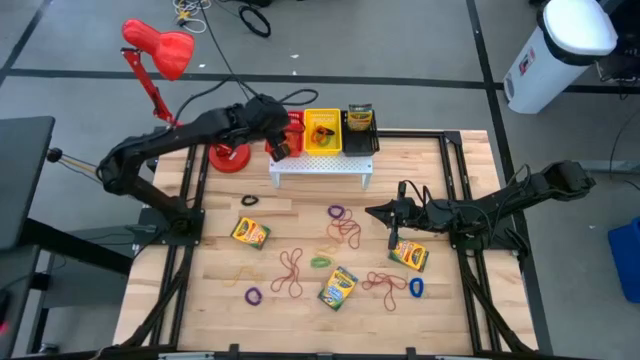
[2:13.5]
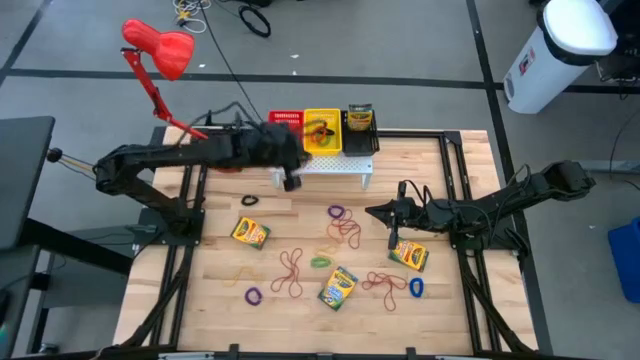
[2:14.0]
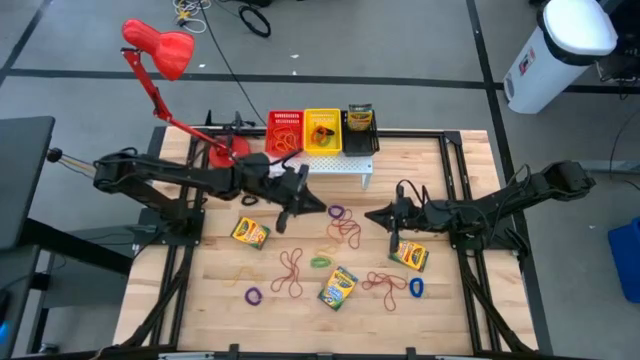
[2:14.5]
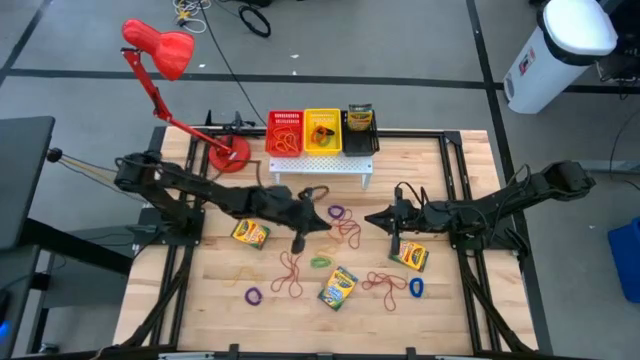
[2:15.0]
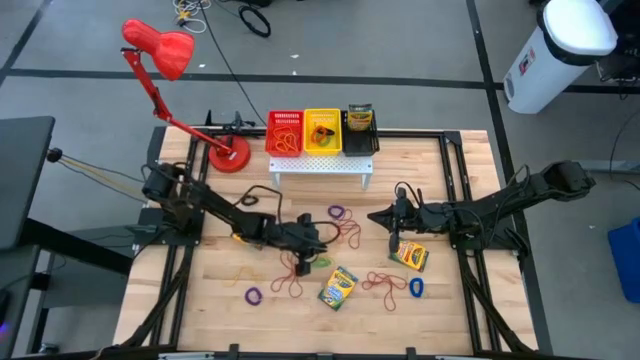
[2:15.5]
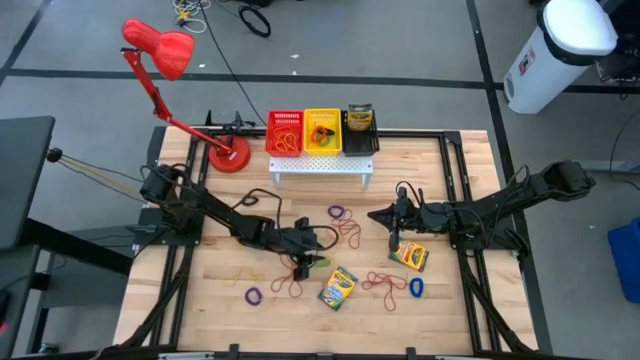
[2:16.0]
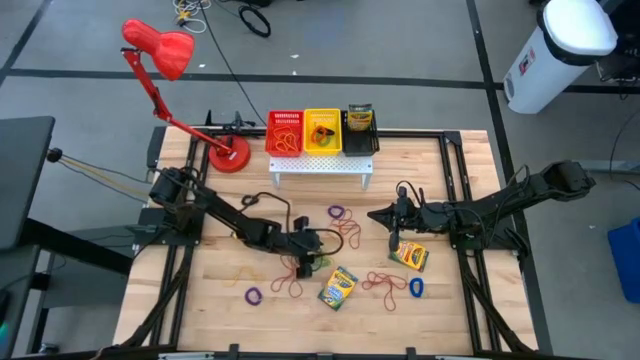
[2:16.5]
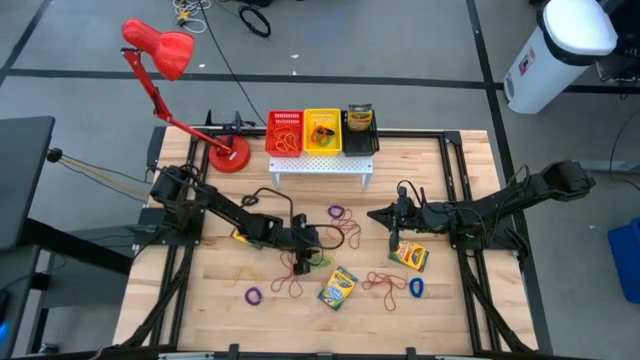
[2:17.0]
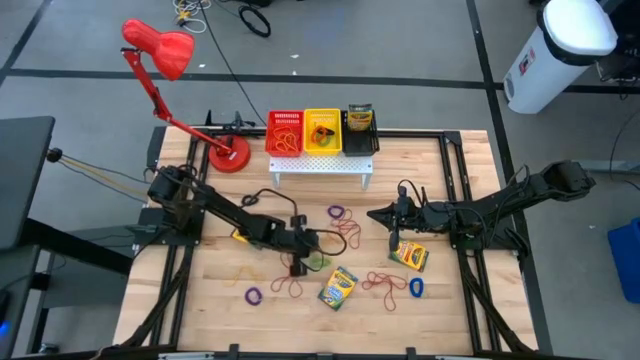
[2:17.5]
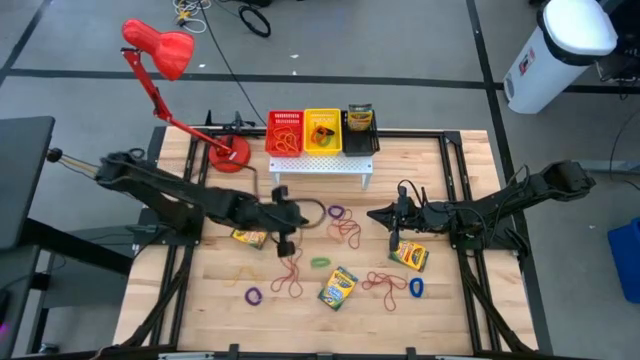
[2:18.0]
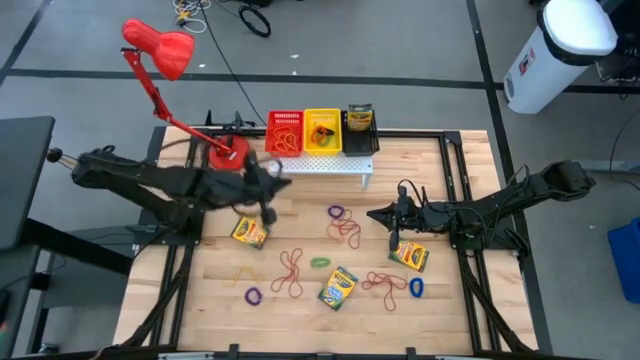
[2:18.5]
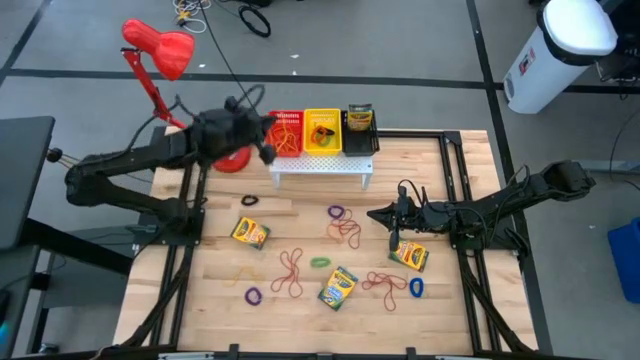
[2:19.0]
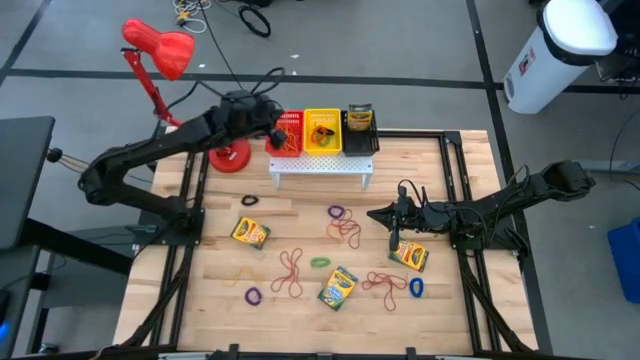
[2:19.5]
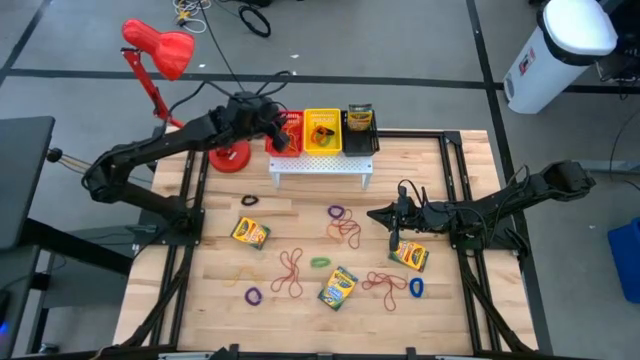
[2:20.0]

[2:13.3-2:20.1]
Task: Pick & Place Office Desk Supplies
Put the yellow rubber band into the red bin on the shelf

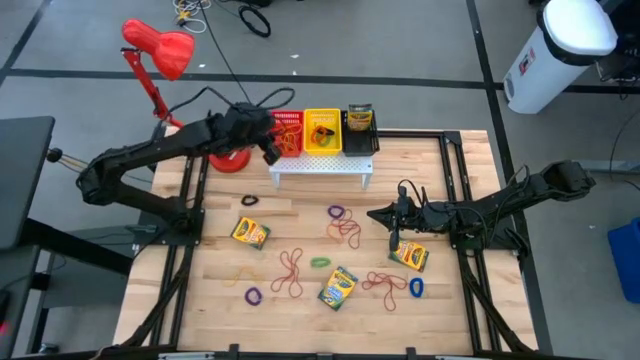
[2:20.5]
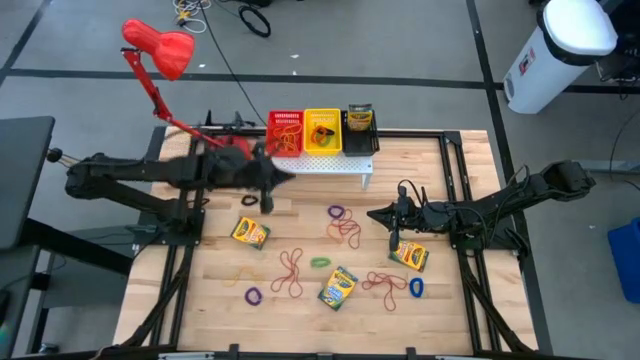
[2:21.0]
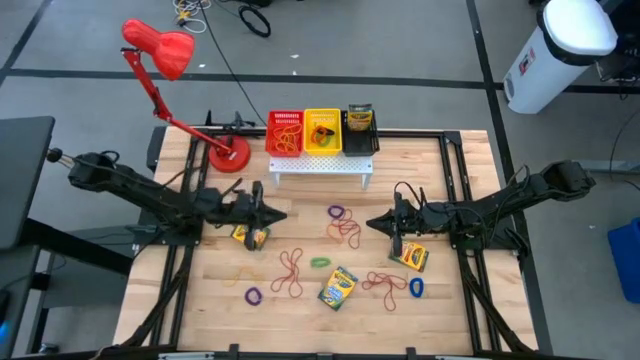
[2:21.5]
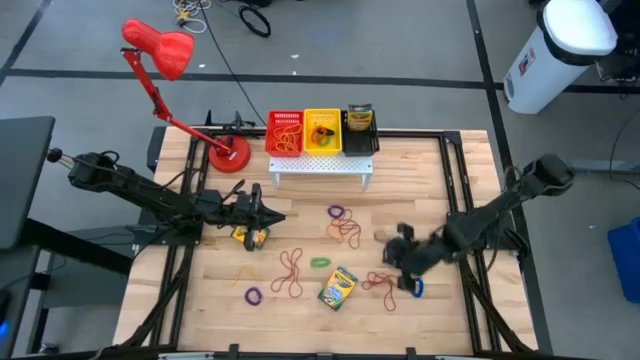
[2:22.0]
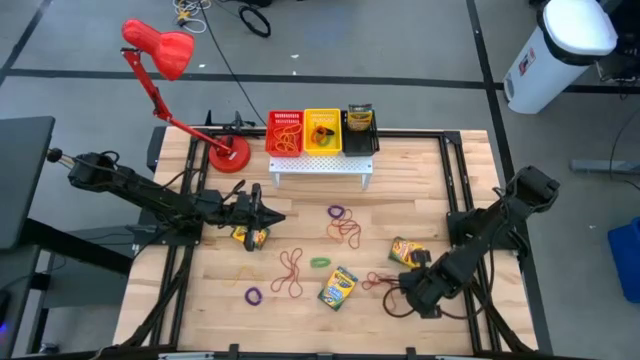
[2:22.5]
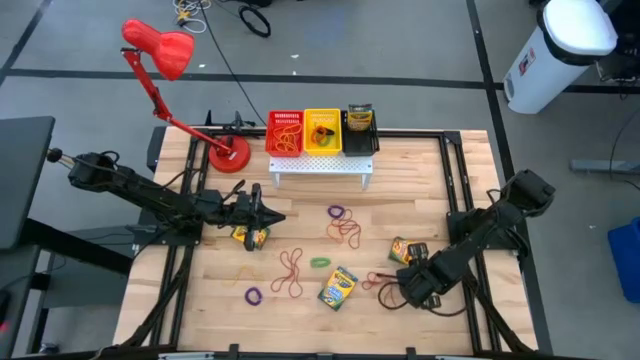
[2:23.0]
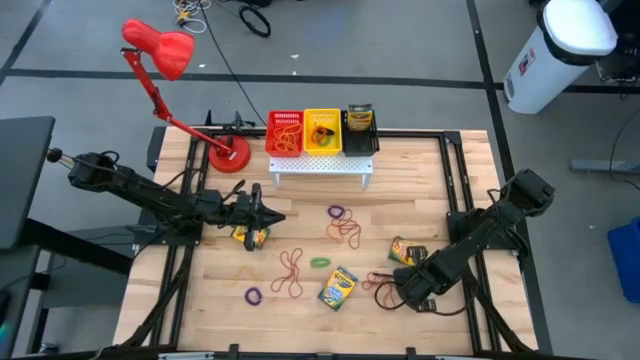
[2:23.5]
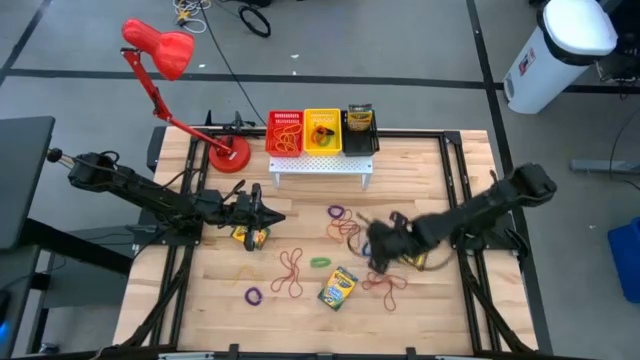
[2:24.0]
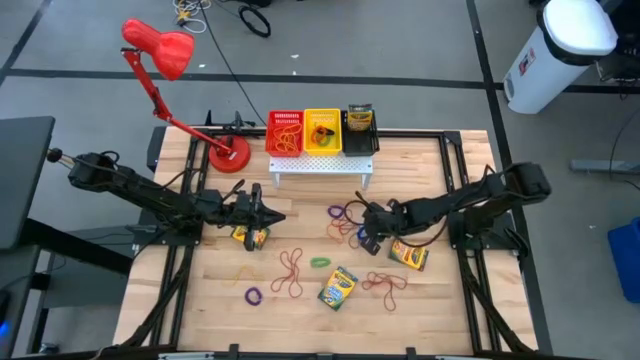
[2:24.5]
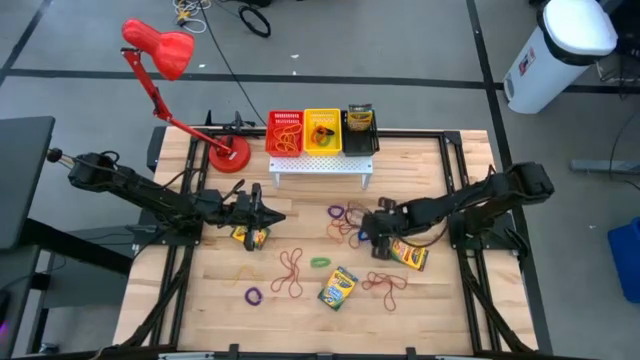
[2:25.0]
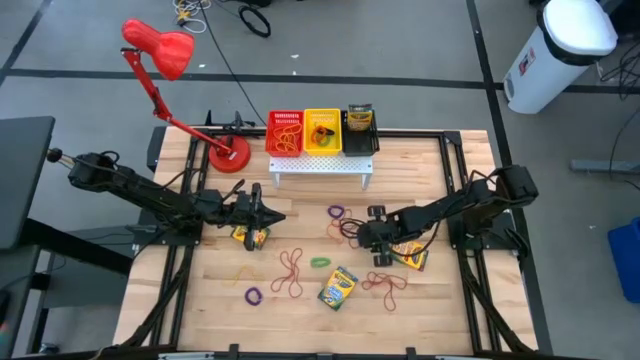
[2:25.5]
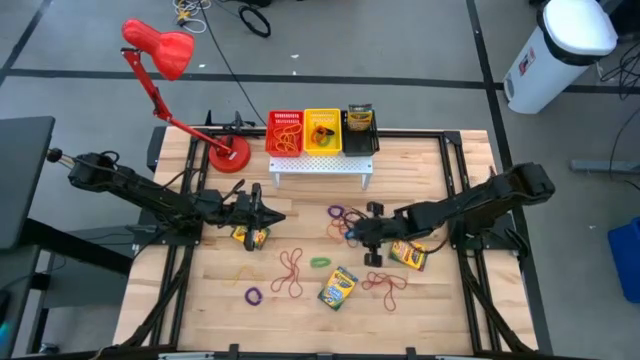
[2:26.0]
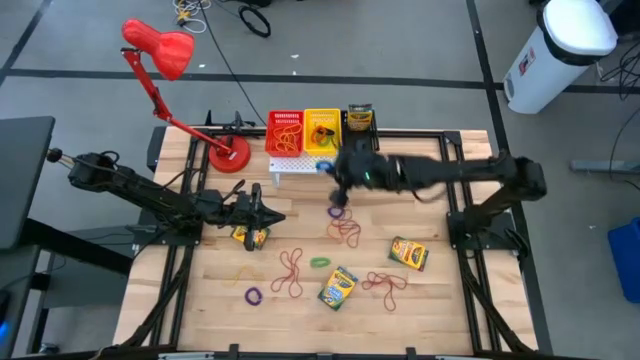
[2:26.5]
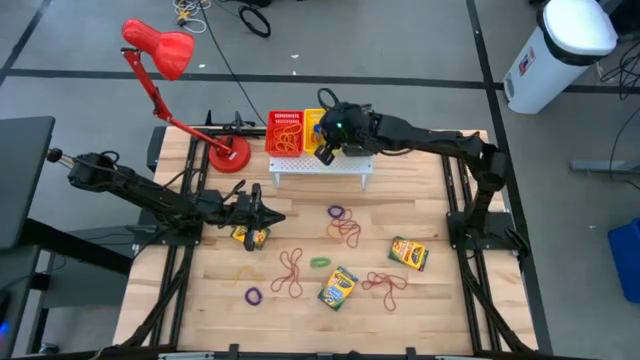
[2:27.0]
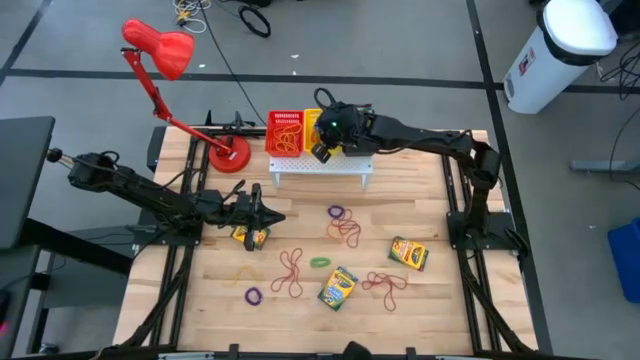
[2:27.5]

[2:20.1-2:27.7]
Put the blue spring keychain into the yellow bin on the shelf

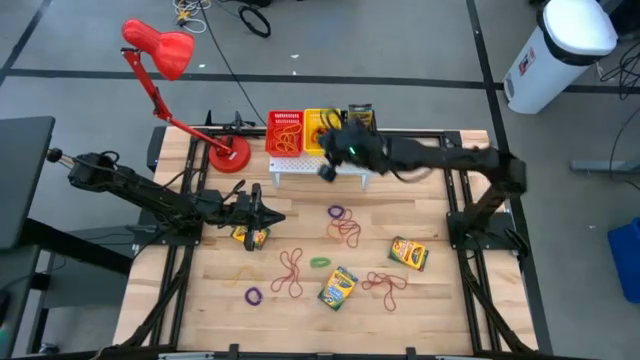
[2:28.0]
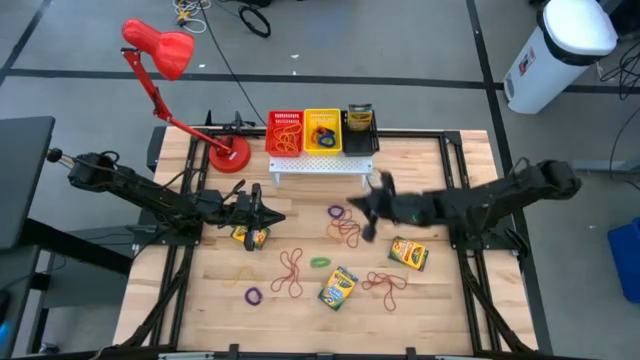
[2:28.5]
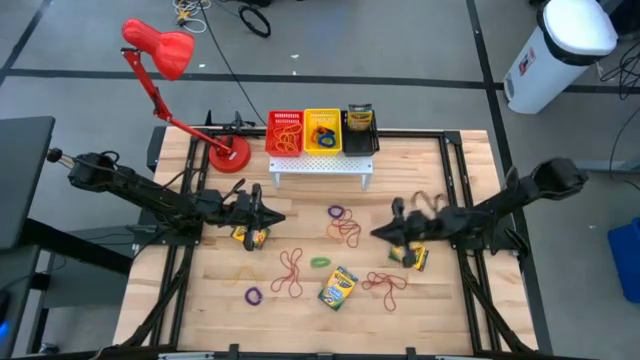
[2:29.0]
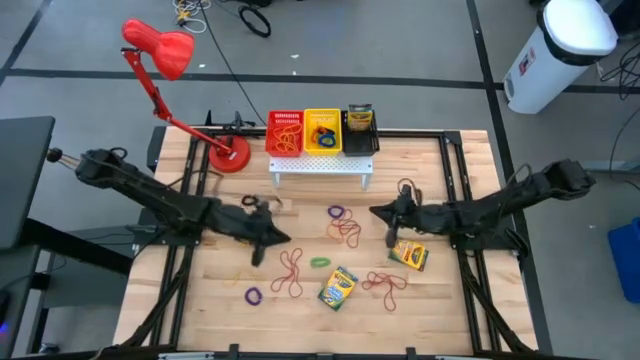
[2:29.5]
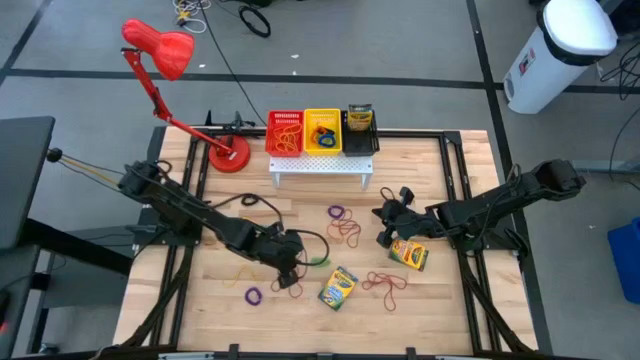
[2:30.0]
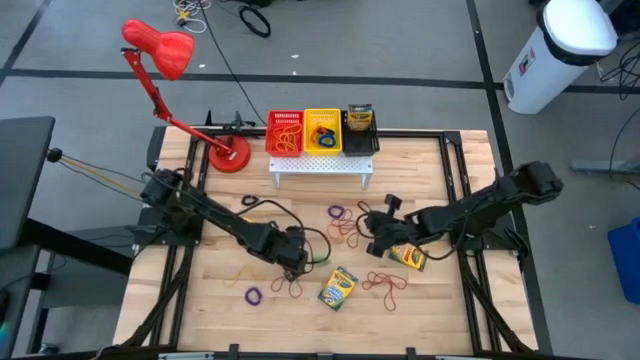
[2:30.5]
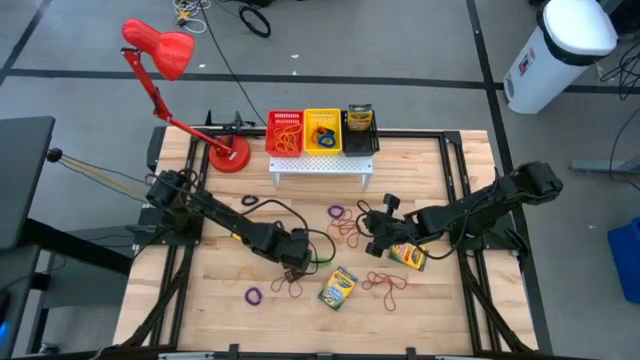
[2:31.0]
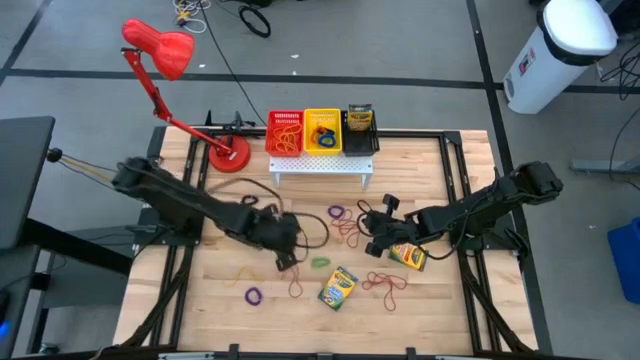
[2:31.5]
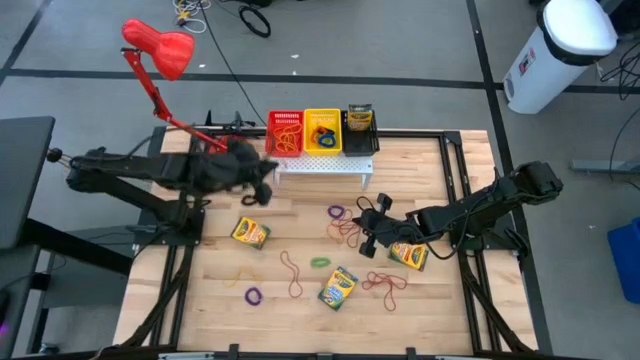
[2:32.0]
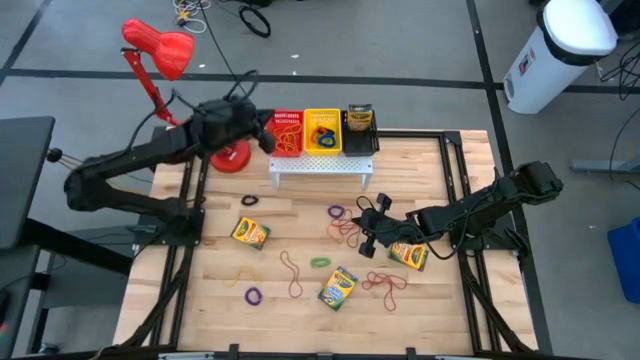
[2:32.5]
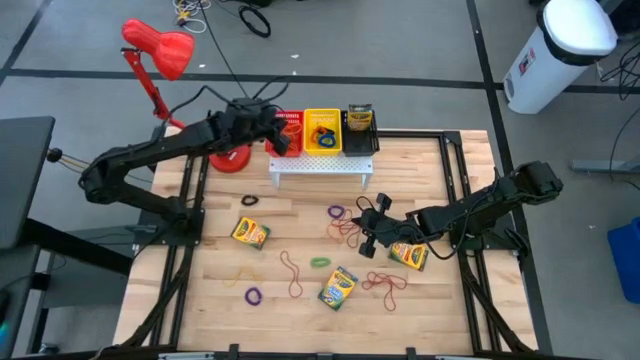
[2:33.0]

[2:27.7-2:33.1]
Put the red rubber band into the red bin on the shelf
